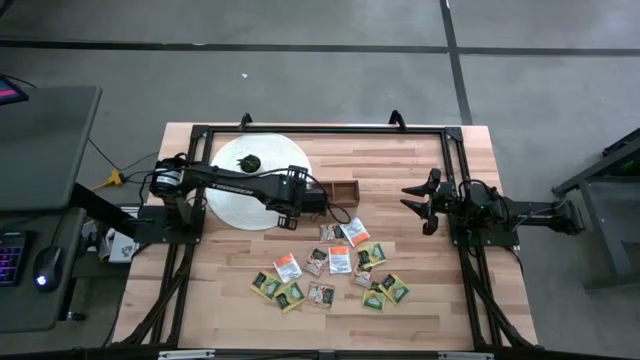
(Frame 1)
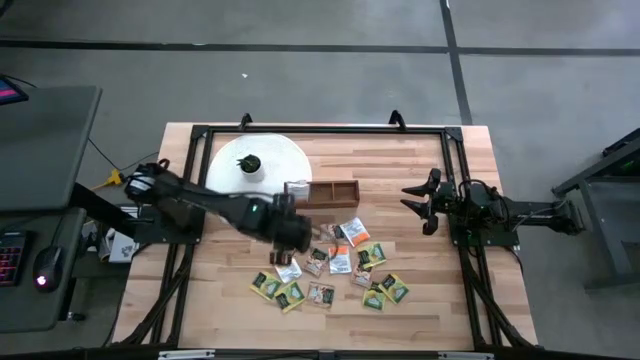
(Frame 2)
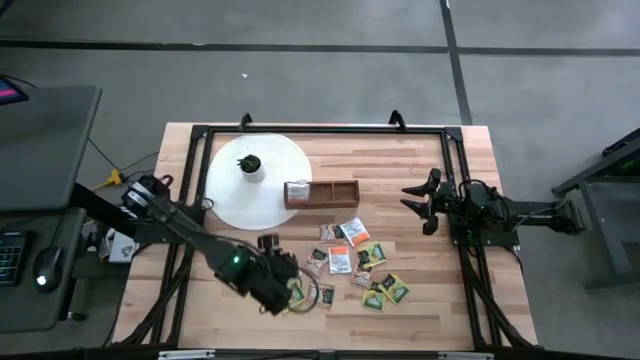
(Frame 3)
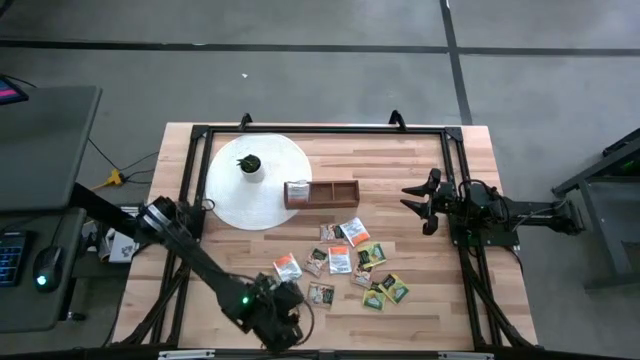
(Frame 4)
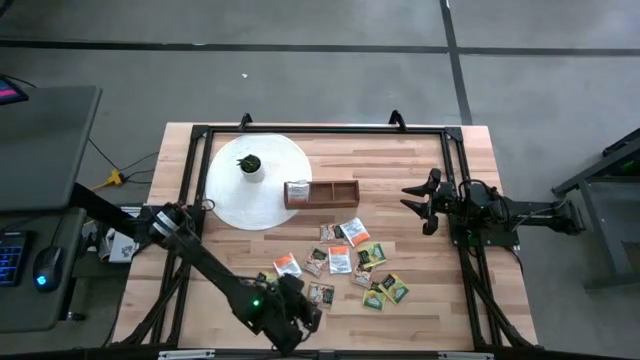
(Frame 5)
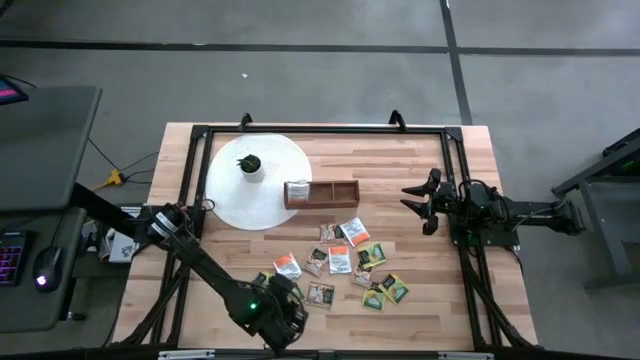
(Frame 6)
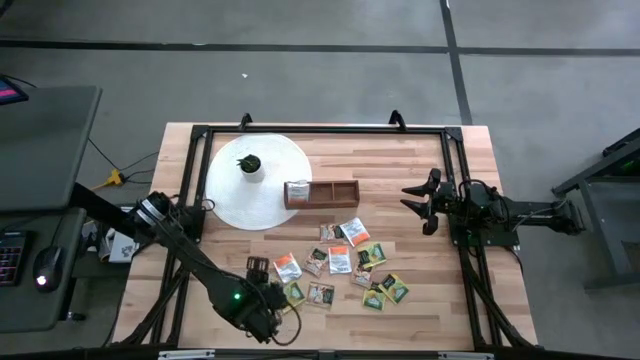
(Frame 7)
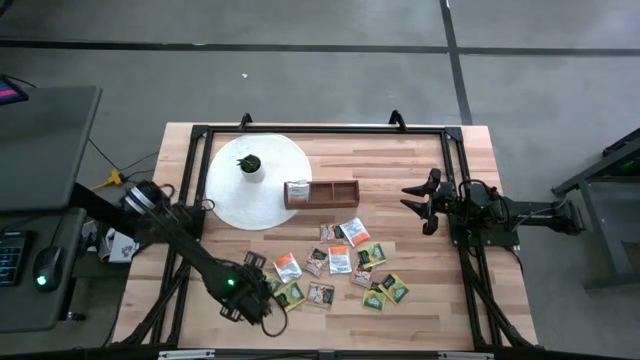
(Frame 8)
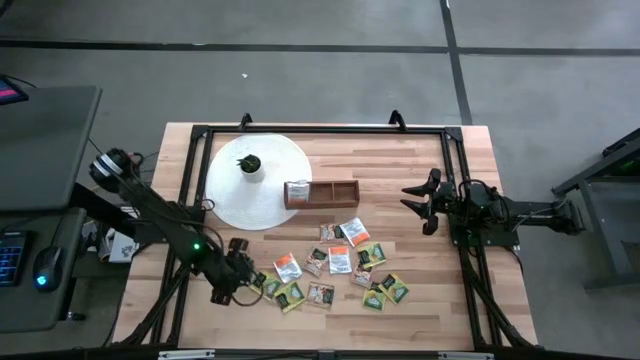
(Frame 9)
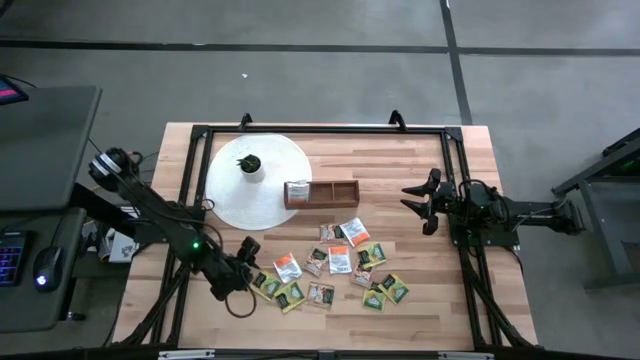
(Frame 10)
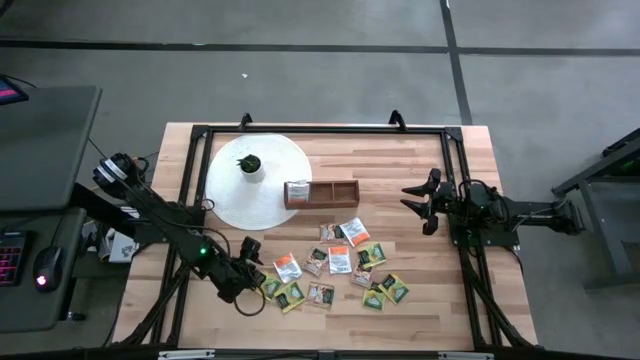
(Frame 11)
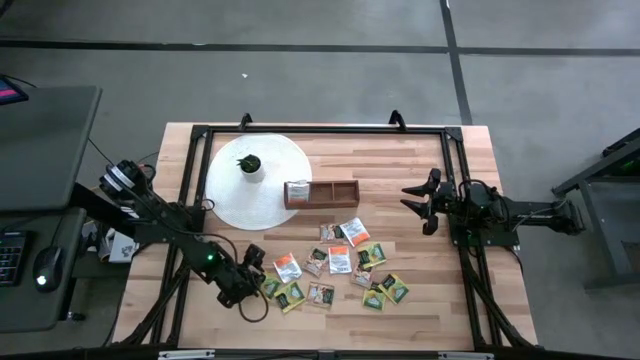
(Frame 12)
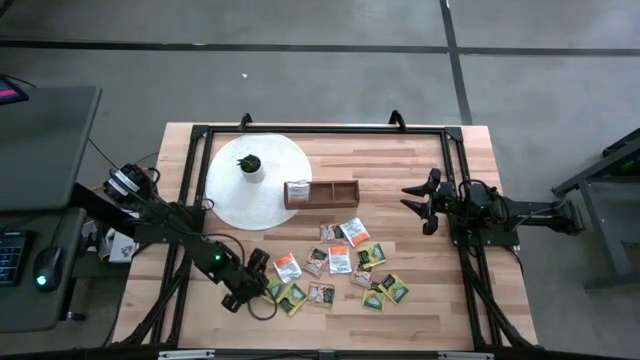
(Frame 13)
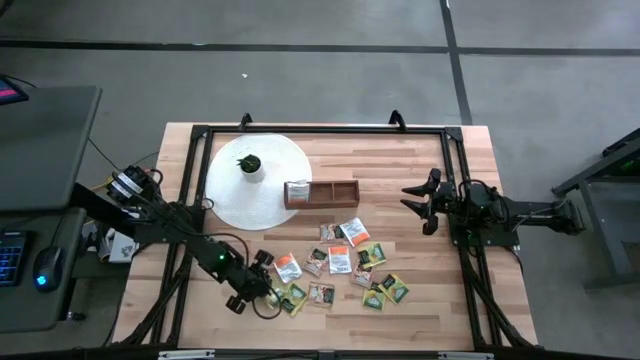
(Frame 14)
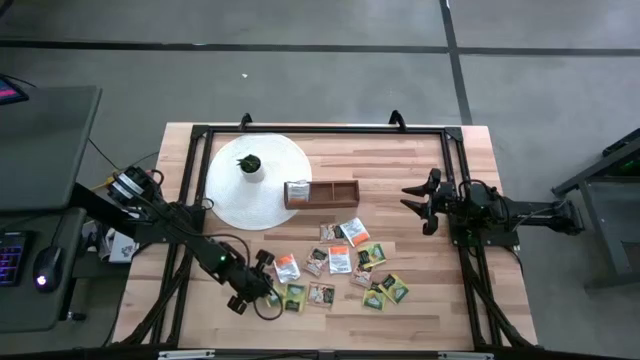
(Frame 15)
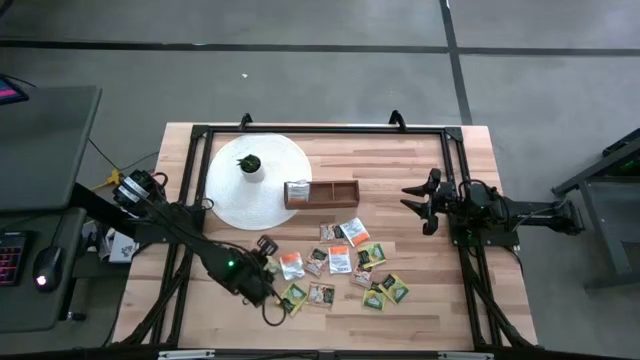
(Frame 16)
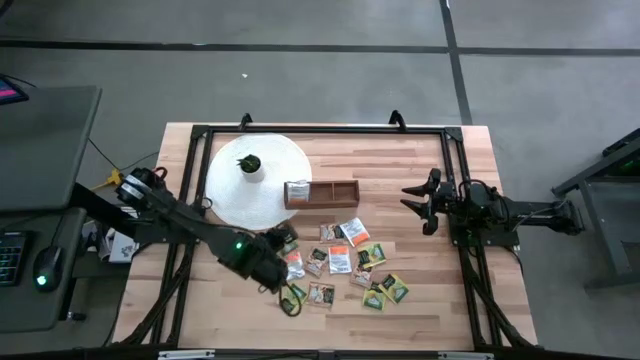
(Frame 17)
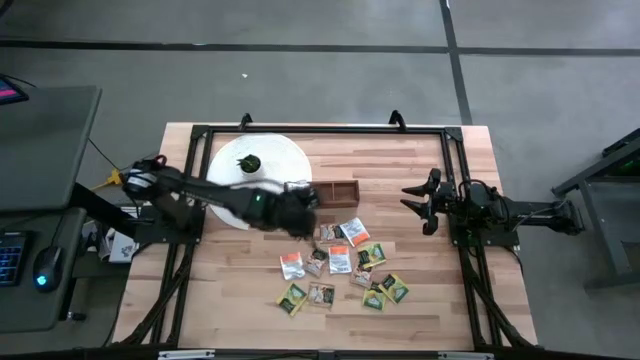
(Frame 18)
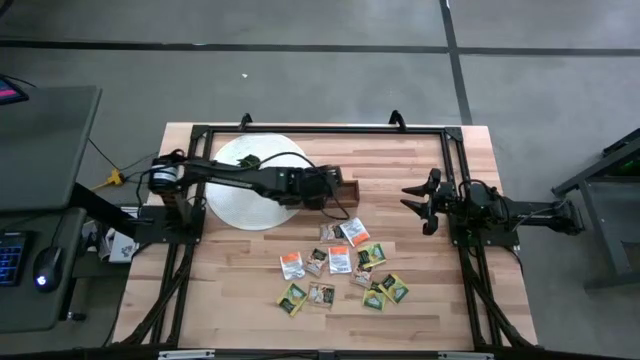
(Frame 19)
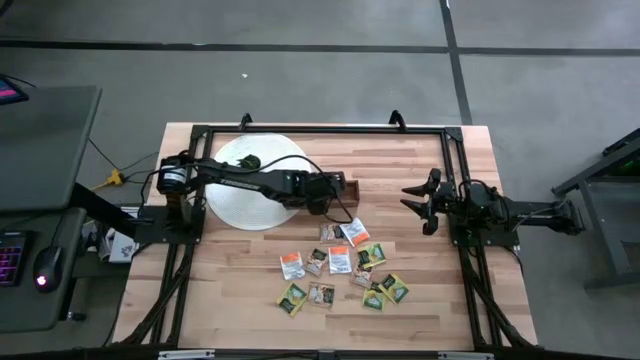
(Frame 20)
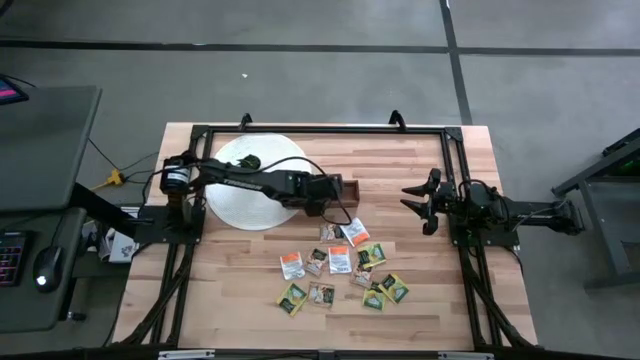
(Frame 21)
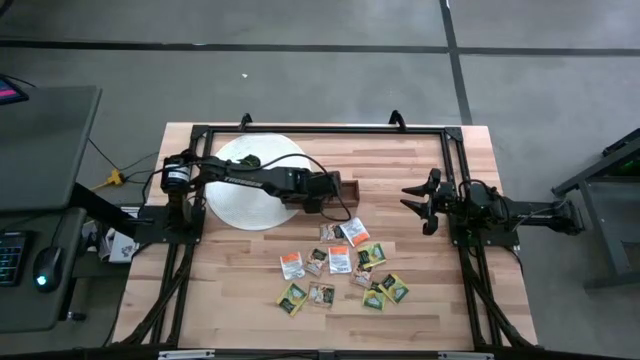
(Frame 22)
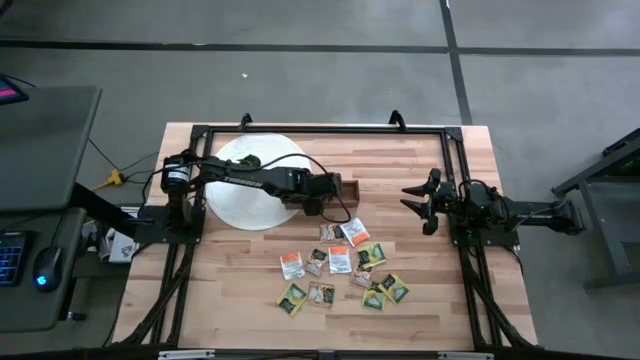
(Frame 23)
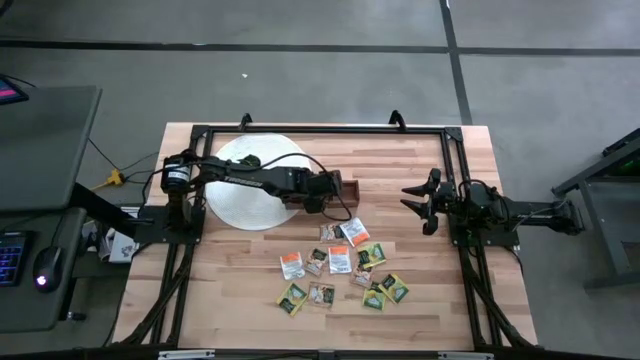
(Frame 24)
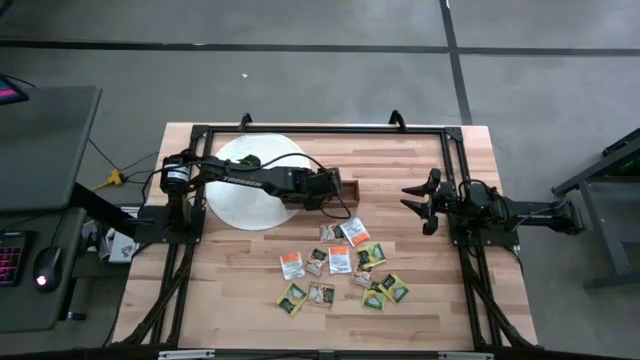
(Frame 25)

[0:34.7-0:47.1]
Task: Pick & Place Tea
Put the yellow tea bag into the middle section of the wooden organizer

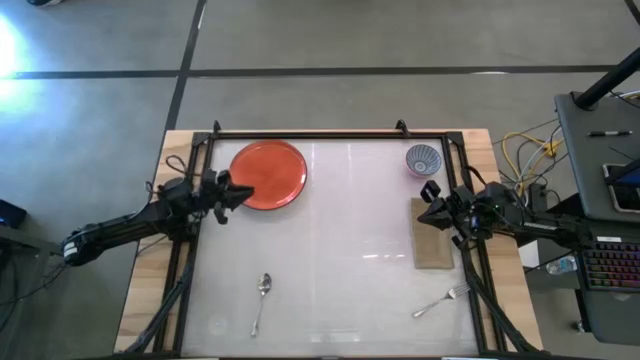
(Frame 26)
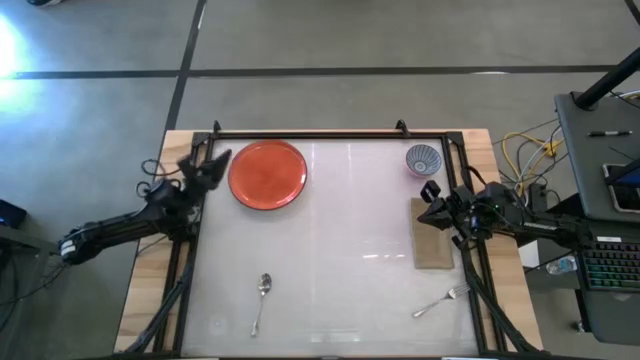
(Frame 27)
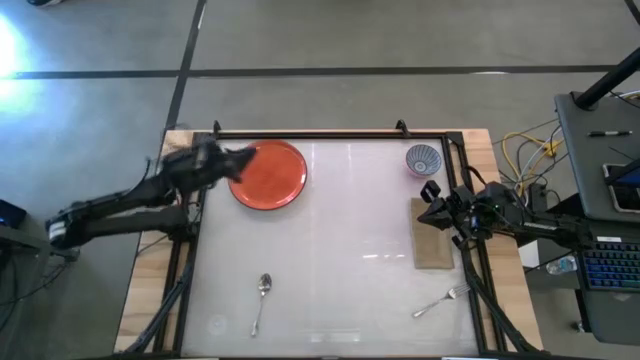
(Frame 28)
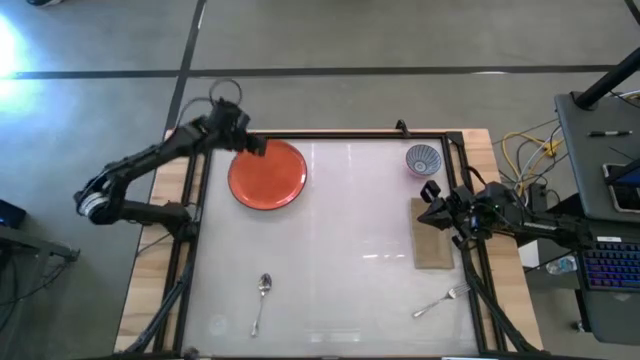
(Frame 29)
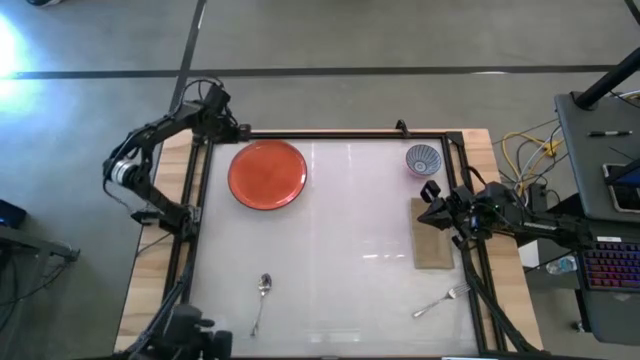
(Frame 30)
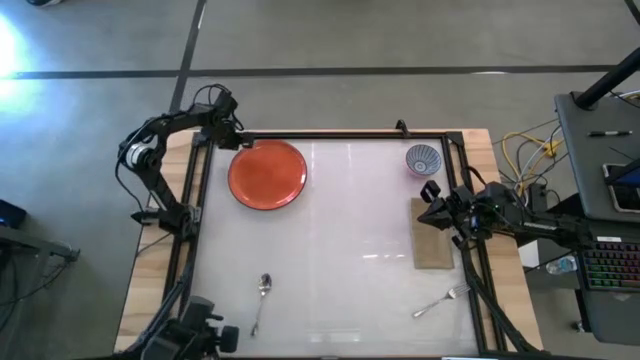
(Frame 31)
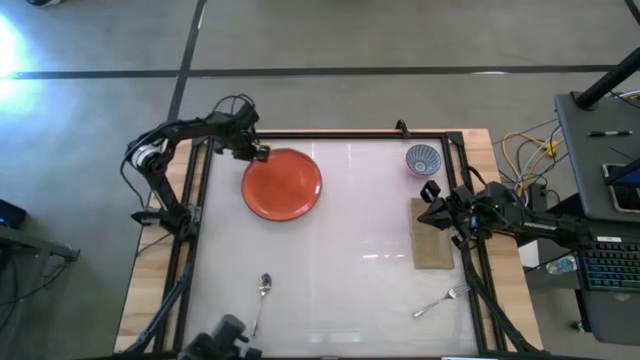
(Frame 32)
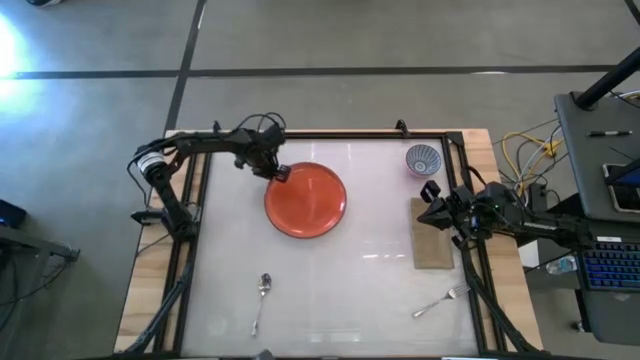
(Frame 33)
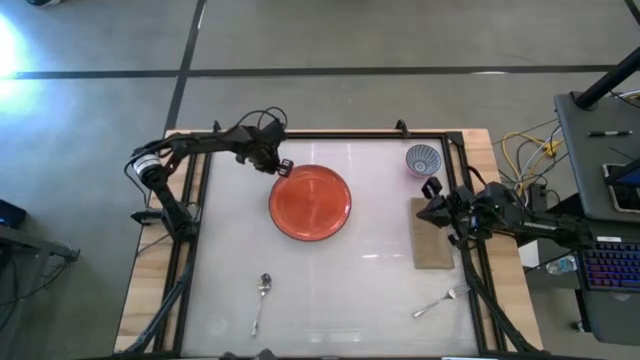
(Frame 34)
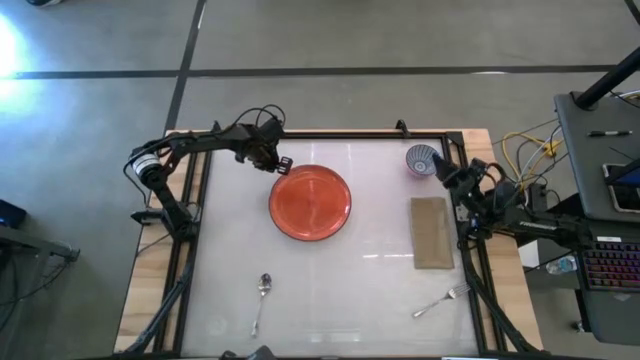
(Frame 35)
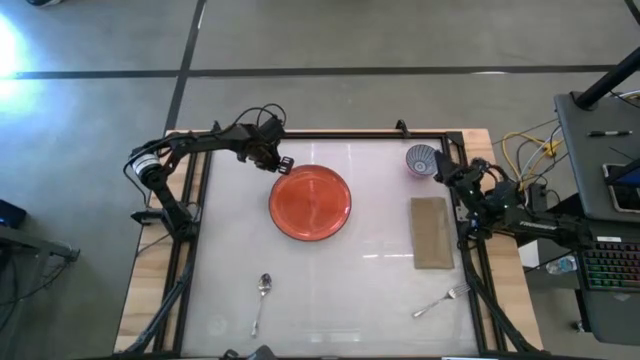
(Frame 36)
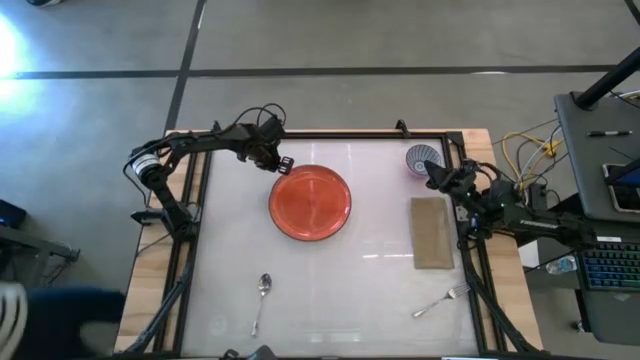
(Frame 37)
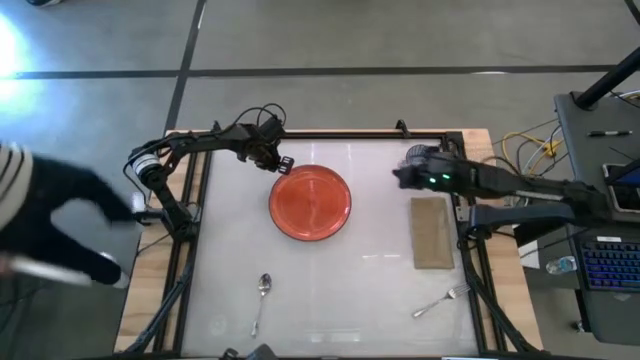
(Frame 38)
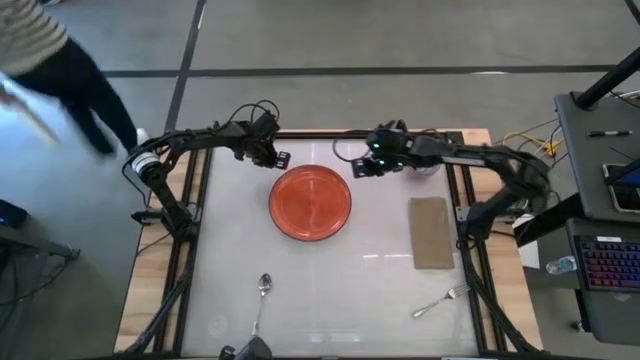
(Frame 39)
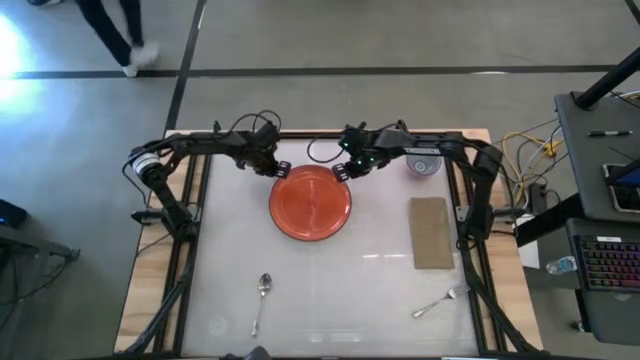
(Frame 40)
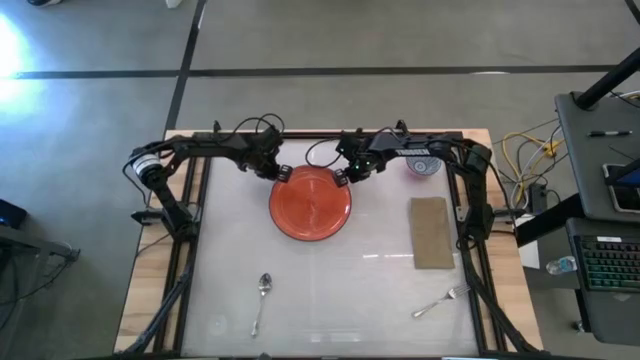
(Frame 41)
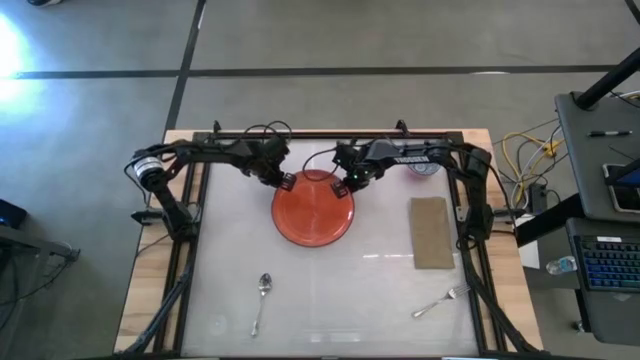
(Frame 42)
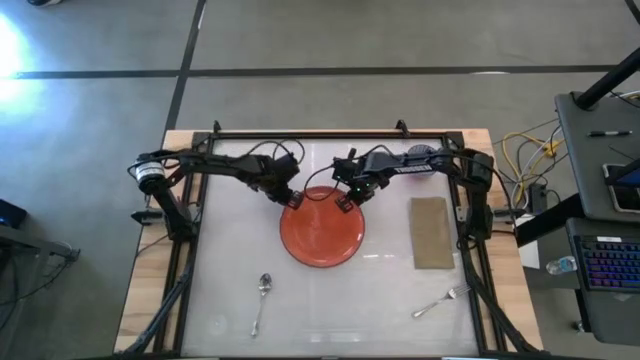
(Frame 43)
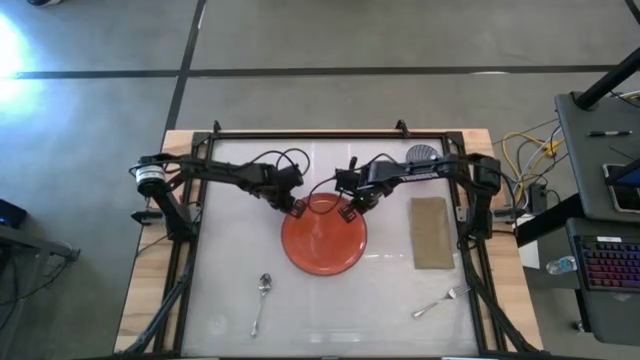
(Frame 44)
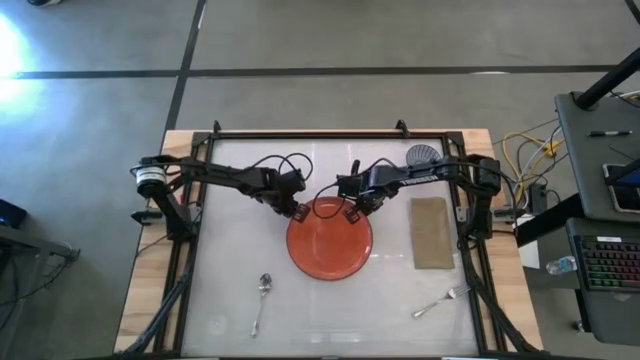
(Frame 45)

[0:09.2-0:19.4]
Task: Set table place
Move the orange plate to the center of the table
